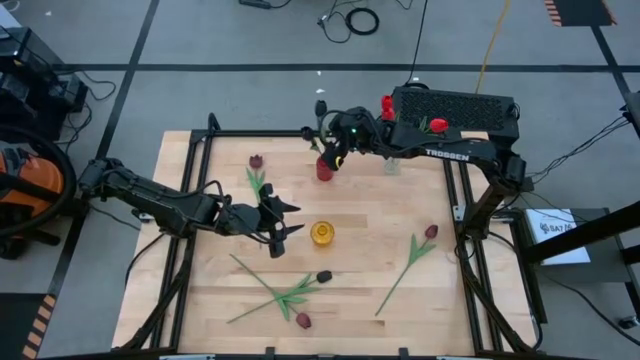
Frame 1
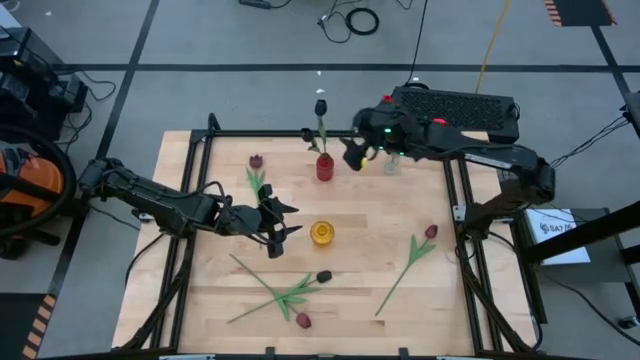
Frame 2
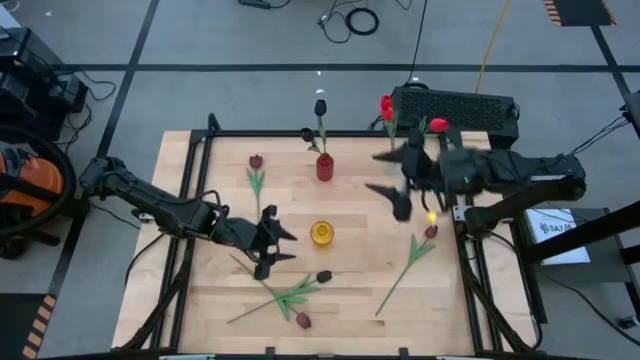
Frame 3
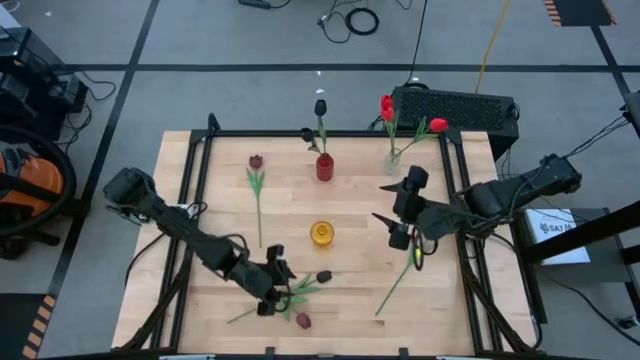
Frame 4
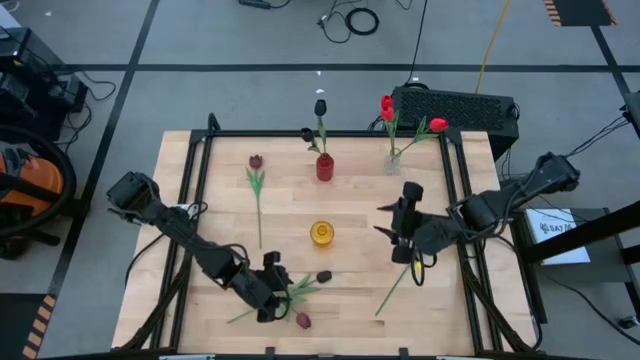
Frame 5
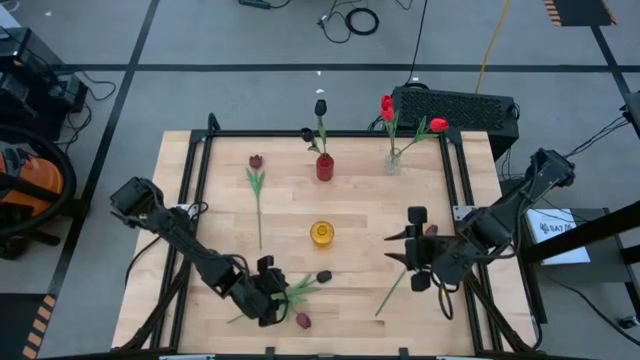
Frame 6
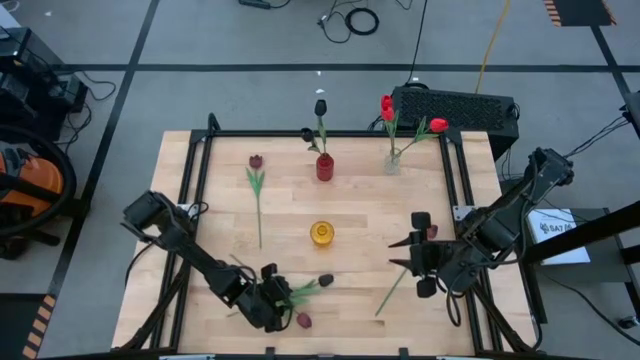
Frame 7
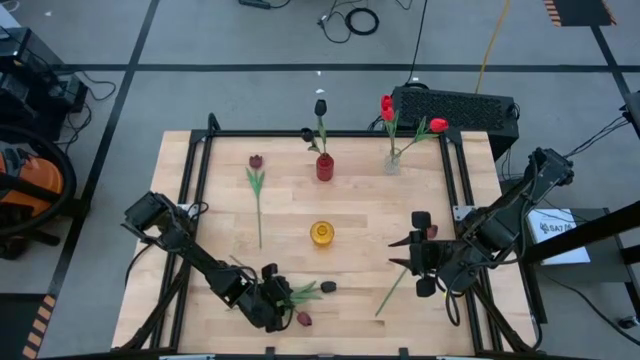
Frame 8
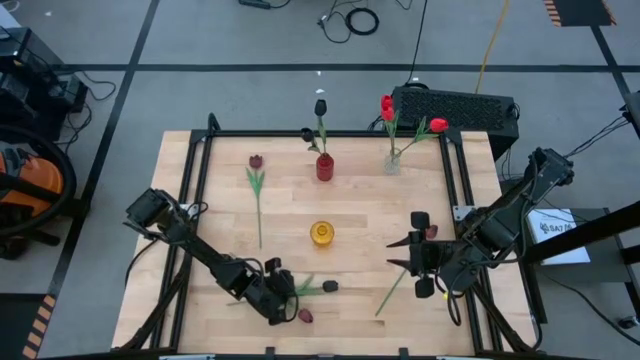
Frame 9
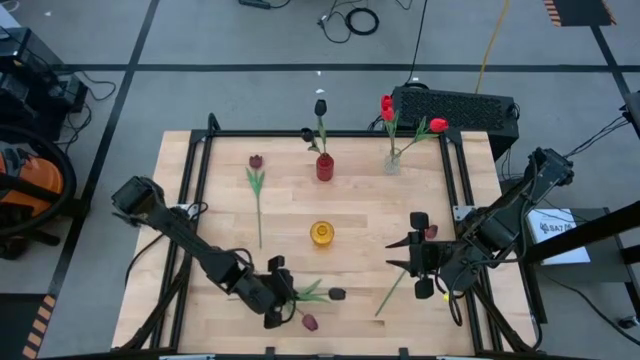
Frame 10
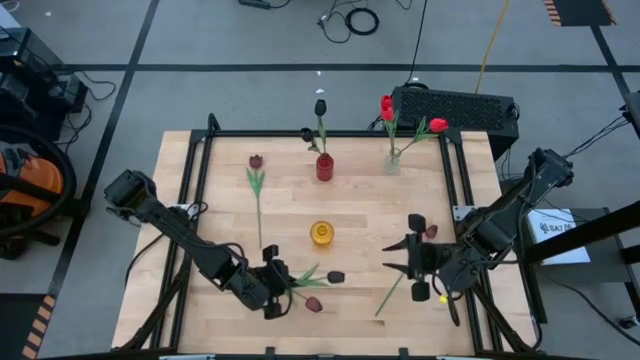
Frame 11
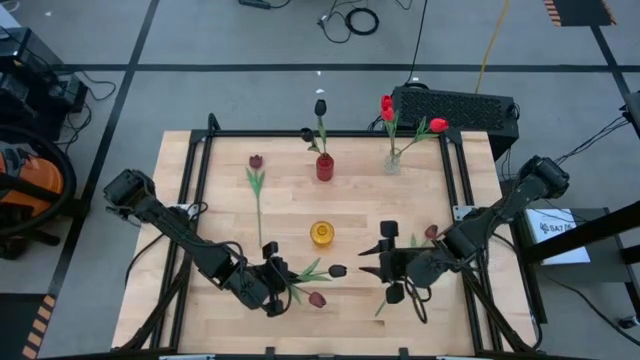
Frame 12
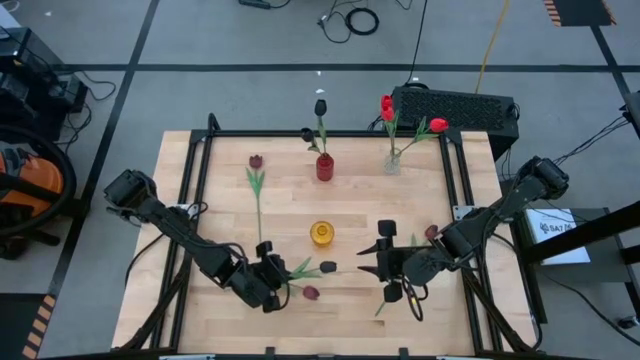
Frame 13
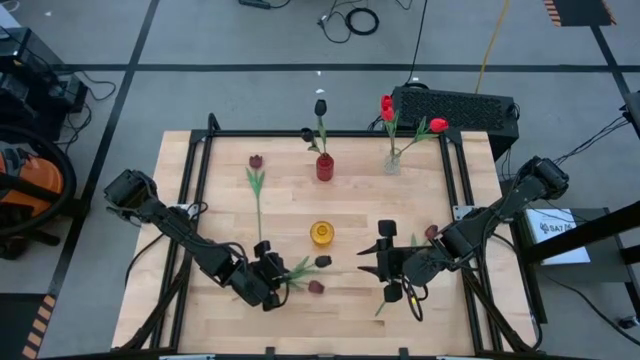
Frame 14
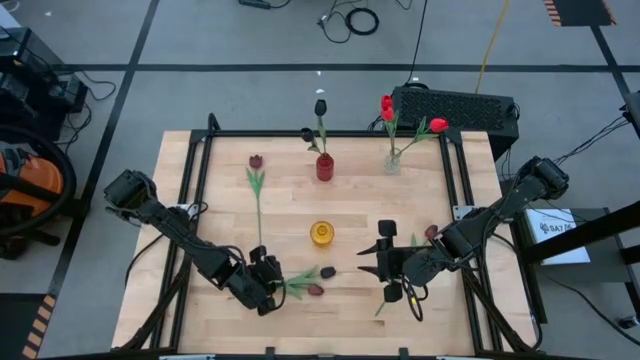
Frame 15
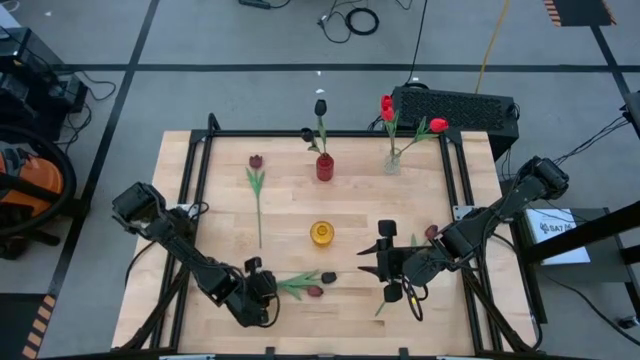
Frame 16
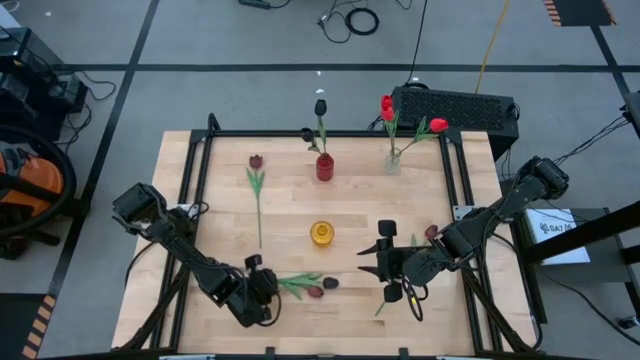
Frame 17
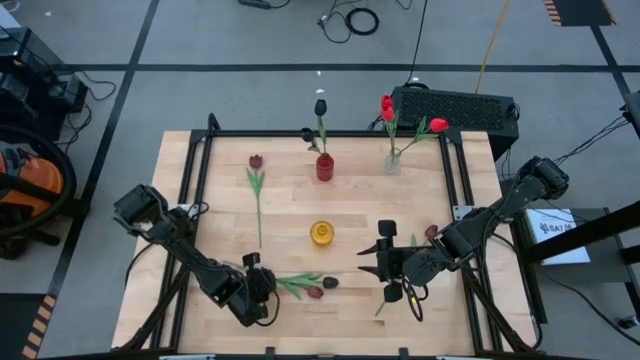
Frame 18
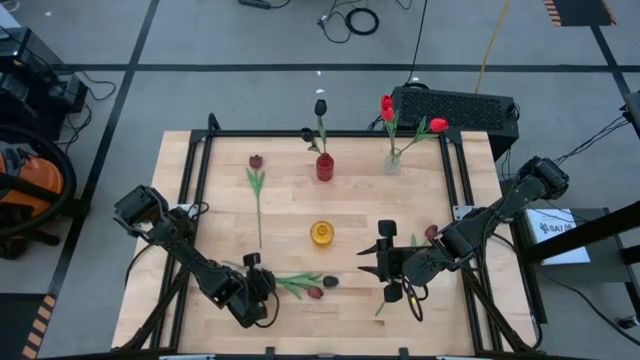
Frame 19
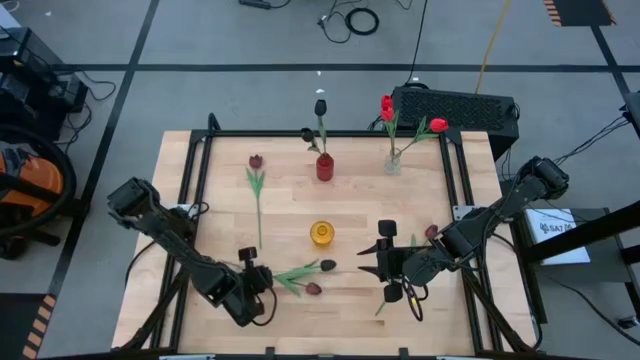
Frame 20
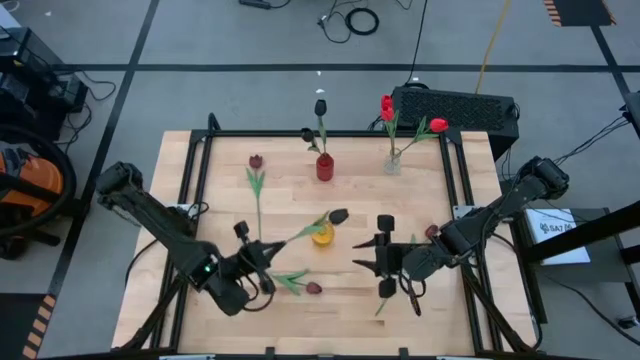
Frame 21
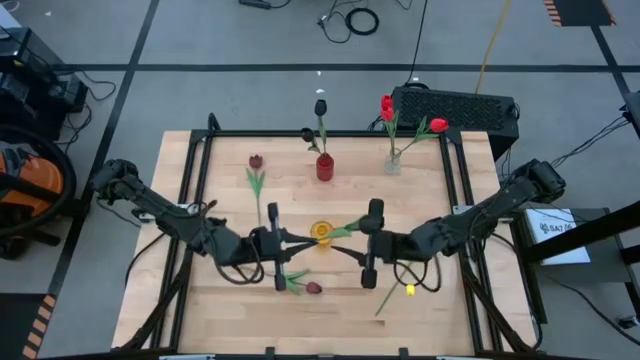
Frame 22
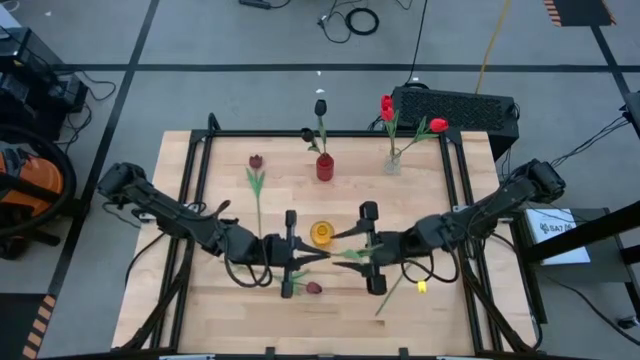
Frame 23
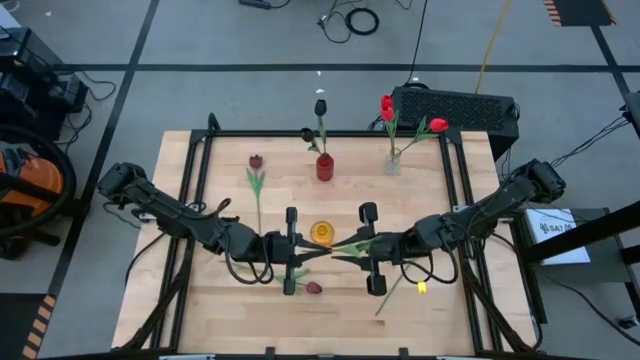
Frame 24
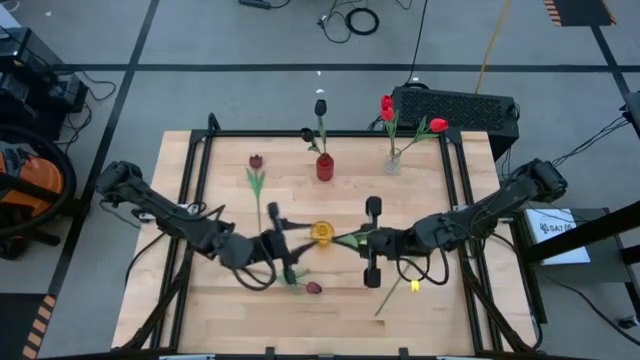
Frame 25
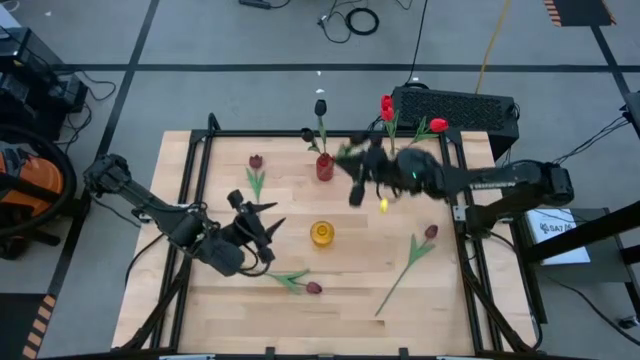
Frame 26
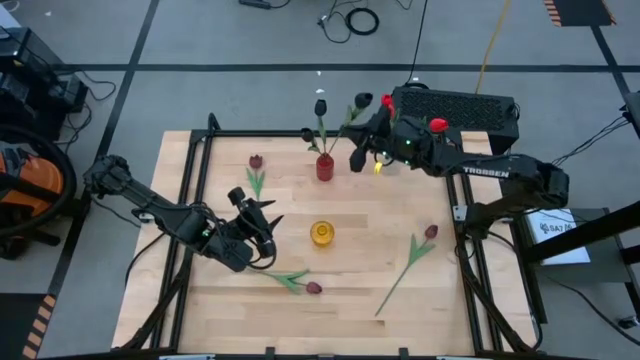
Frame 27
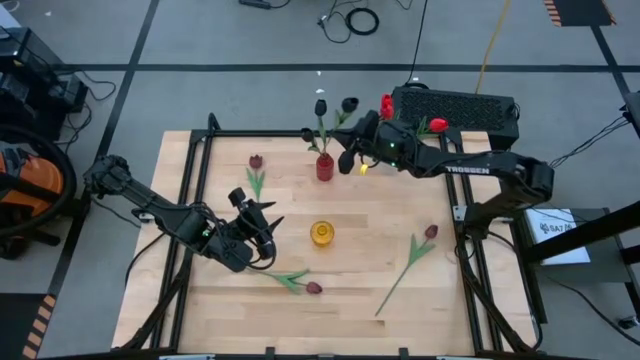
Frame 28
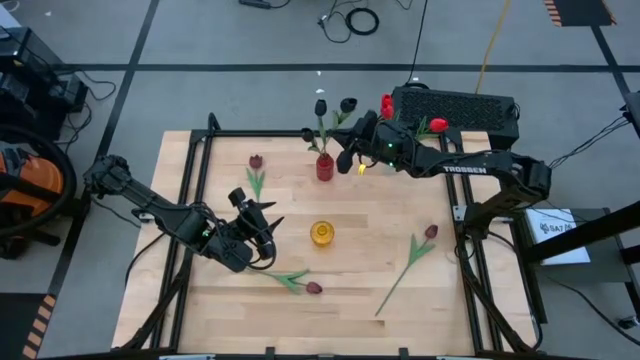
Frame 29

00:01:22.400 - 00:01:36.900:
Task: Sort flowers into vase by color
Put the black flower into the red vase

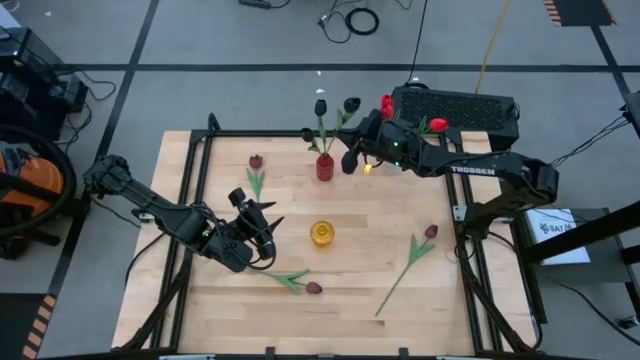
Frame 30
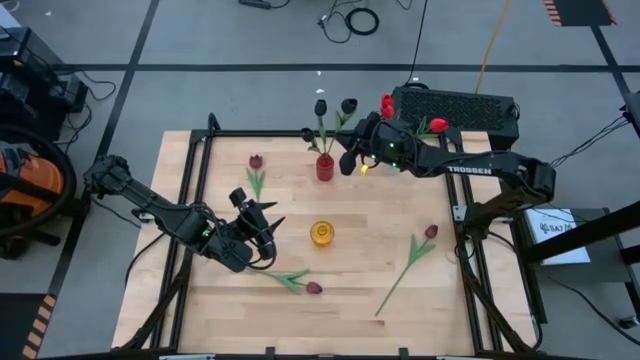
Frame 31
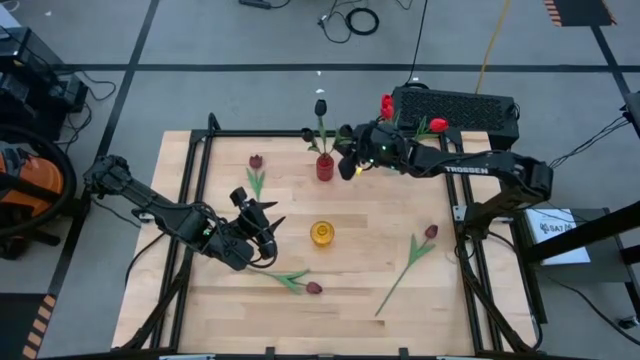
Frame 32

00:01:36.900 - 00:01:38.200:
Put the black flower into the red vase

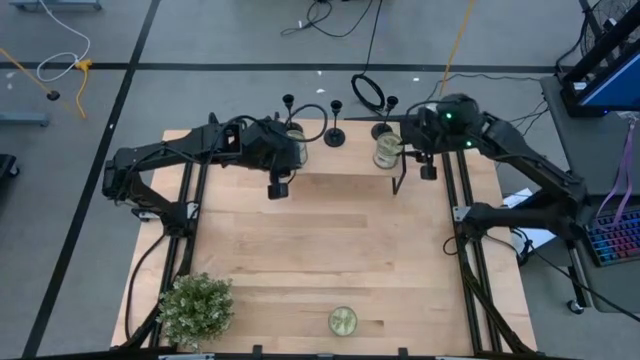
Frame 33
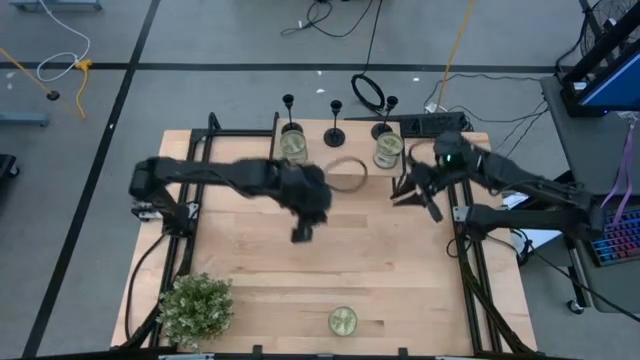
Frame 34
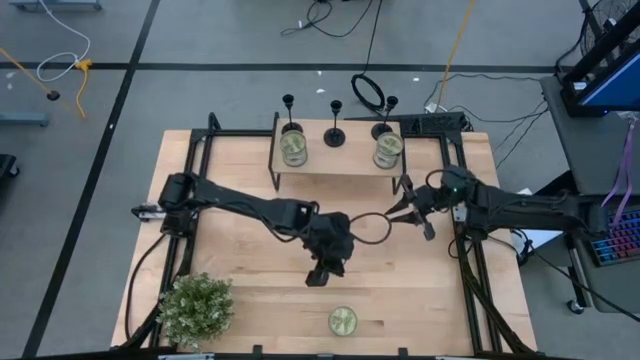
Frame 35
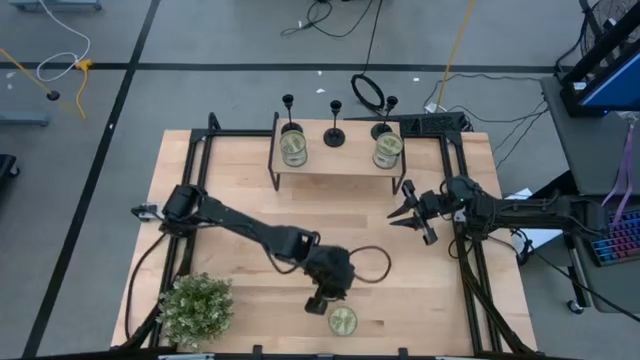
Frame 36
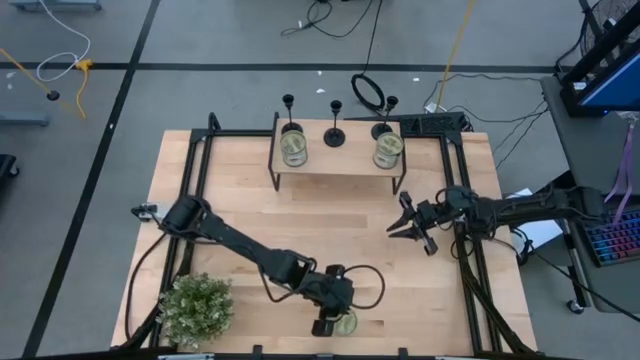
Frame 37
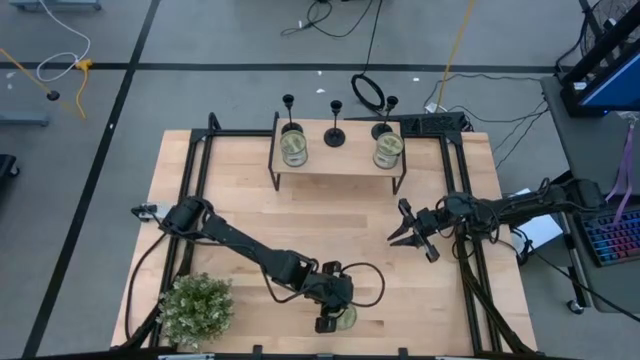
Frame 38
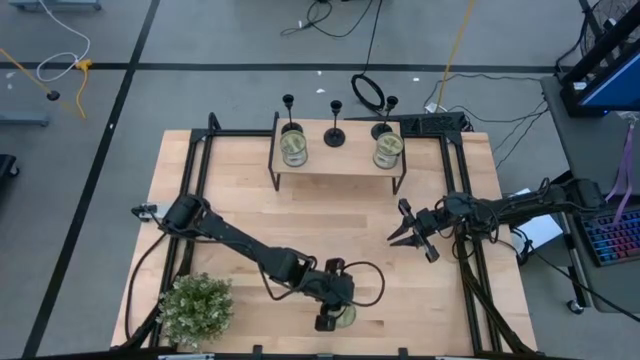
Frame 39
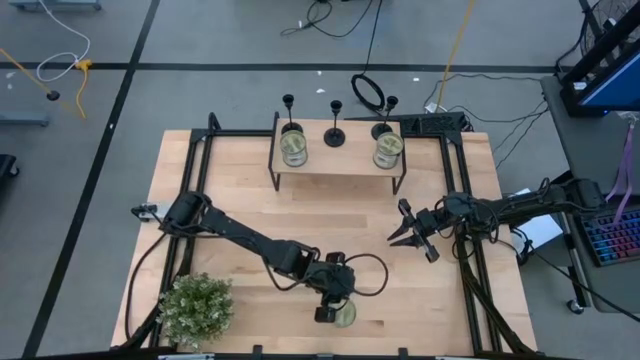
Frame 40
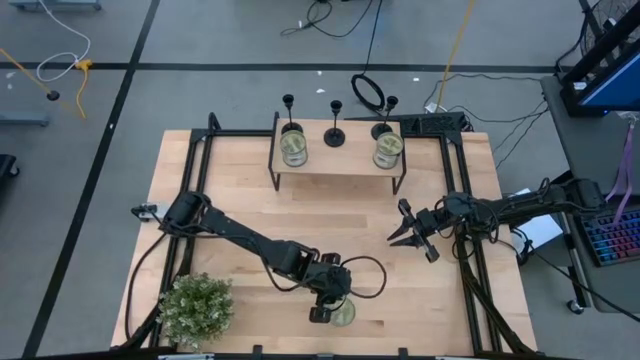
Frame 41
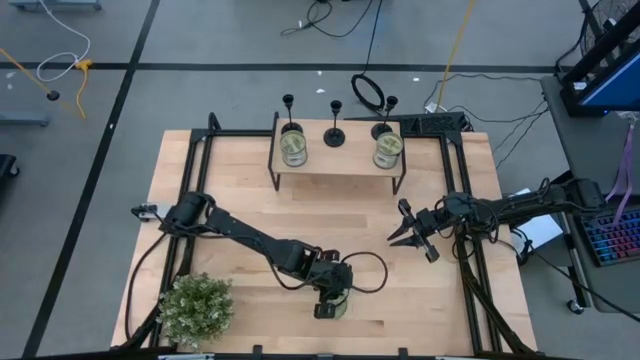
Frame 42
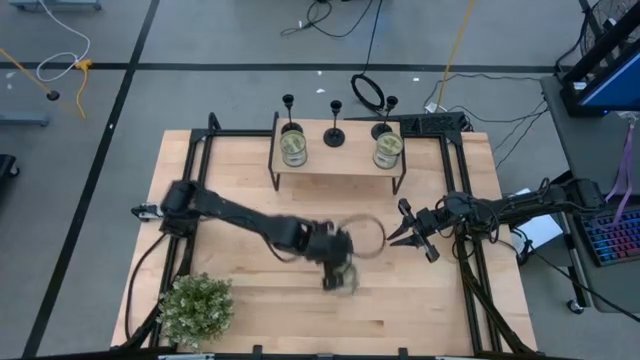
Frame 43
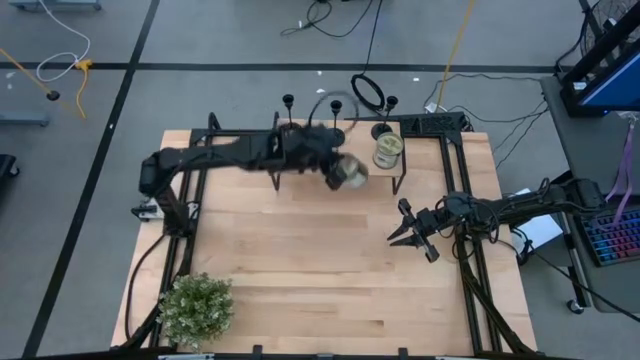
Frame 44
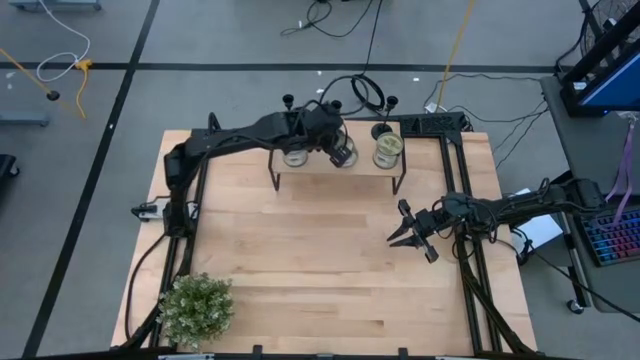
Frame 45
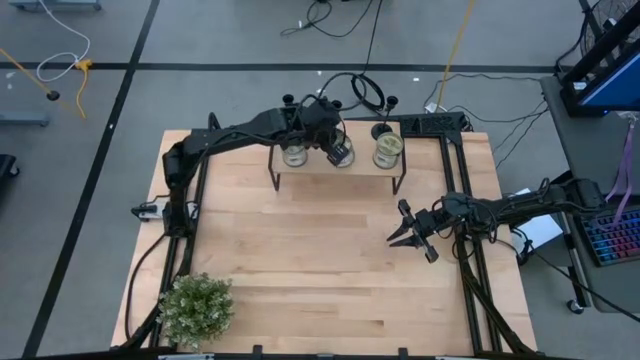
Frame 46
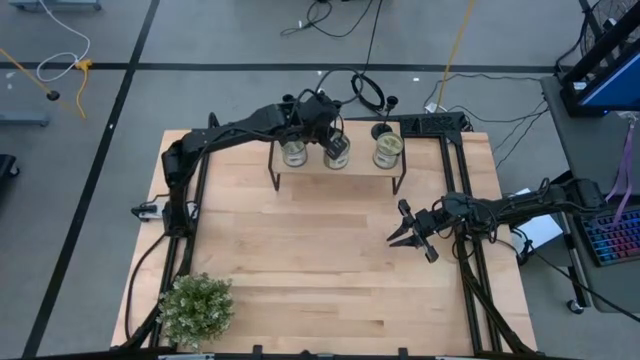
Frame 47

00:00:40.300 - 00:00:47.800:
Task: Pick & Place candle stick holders
Put the light green scented candle on the shelf
